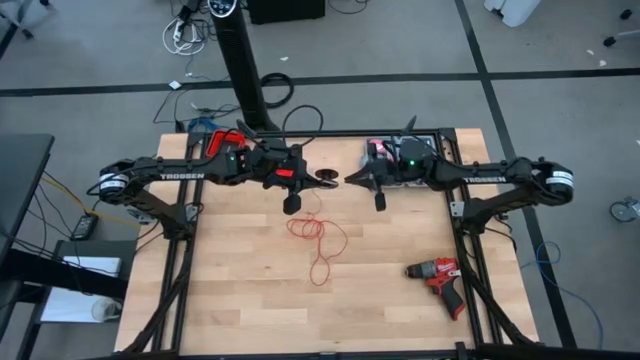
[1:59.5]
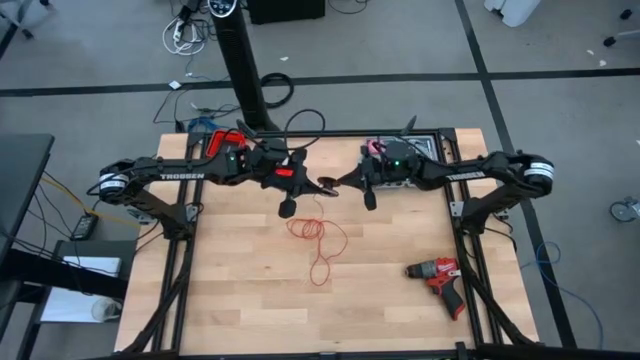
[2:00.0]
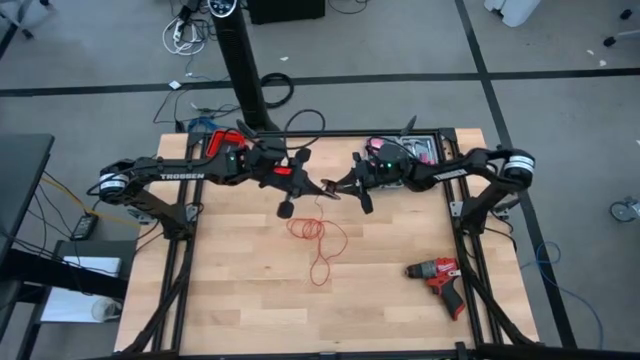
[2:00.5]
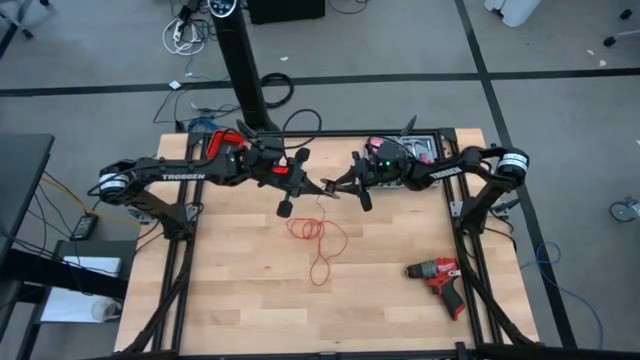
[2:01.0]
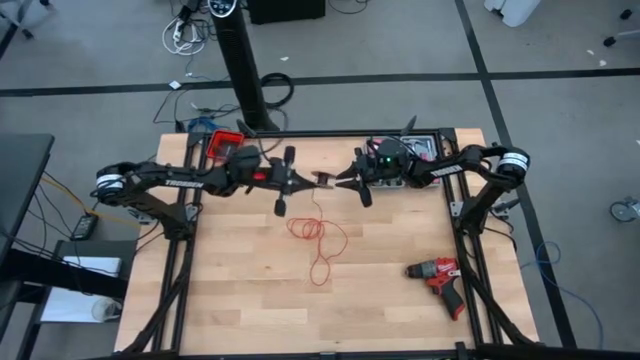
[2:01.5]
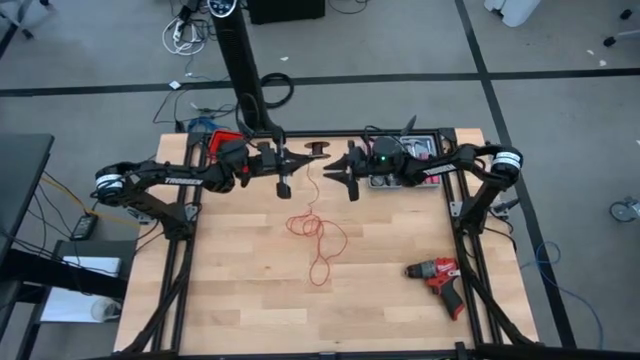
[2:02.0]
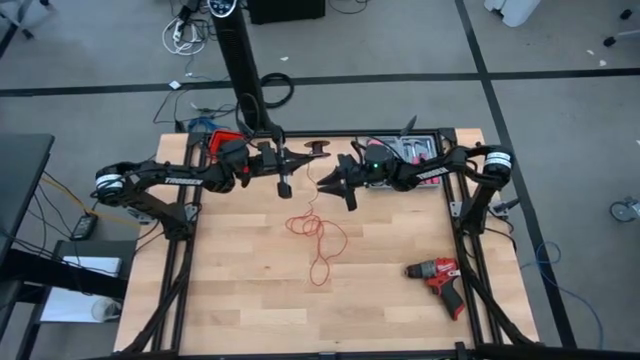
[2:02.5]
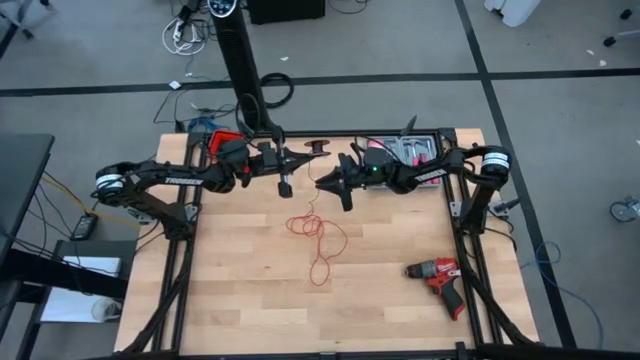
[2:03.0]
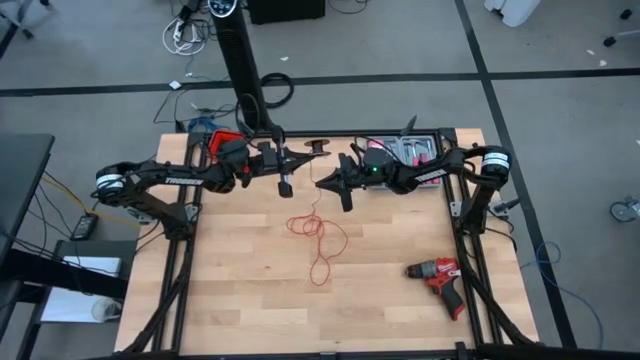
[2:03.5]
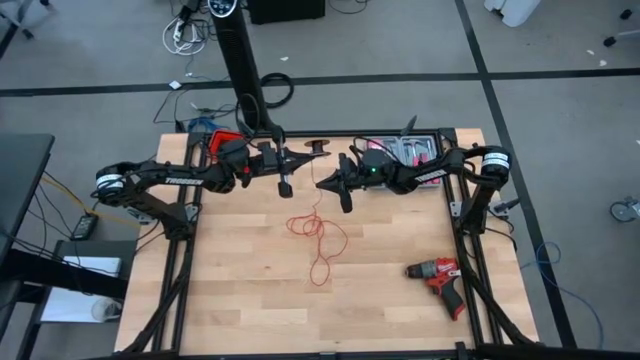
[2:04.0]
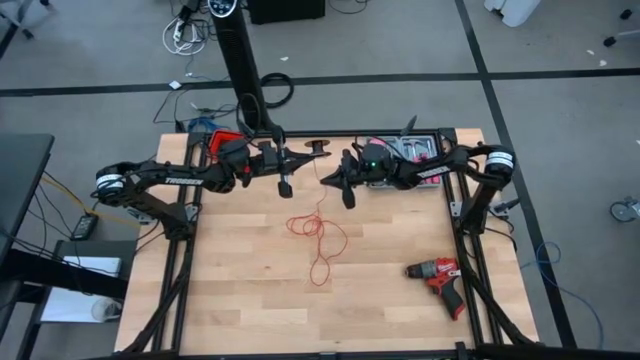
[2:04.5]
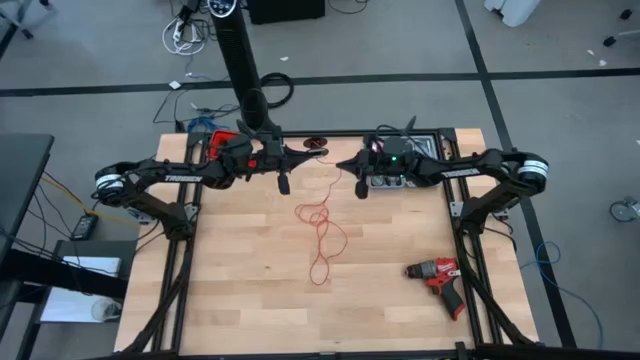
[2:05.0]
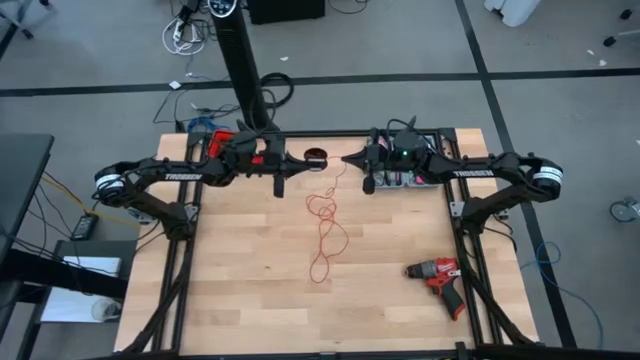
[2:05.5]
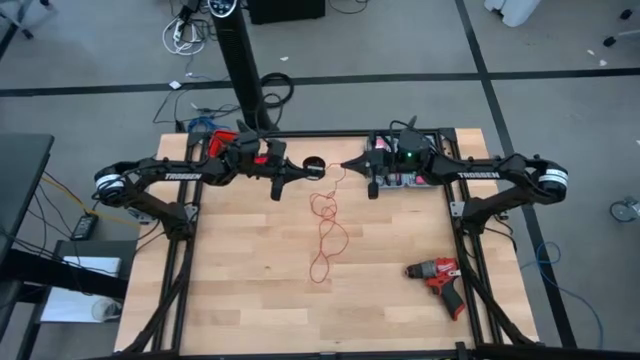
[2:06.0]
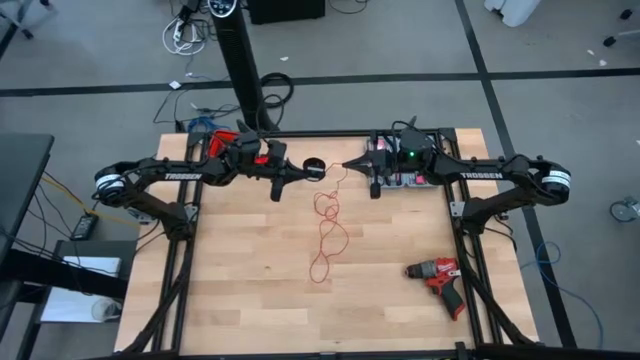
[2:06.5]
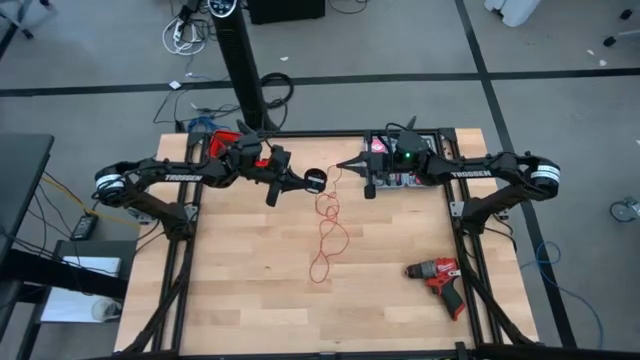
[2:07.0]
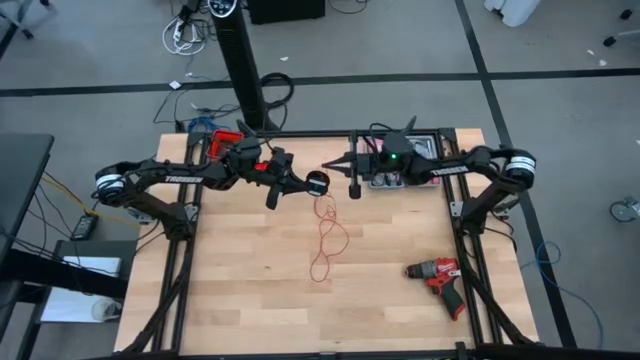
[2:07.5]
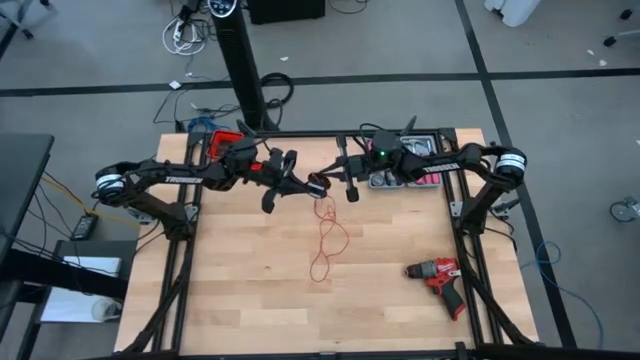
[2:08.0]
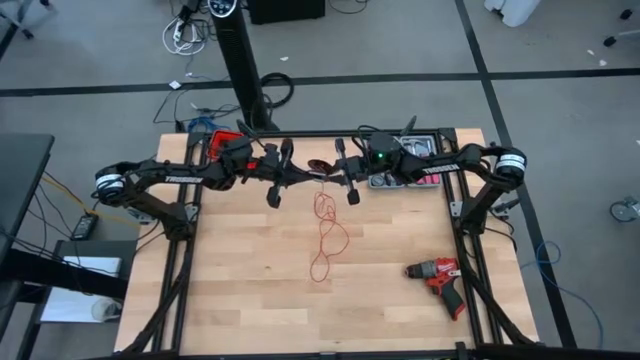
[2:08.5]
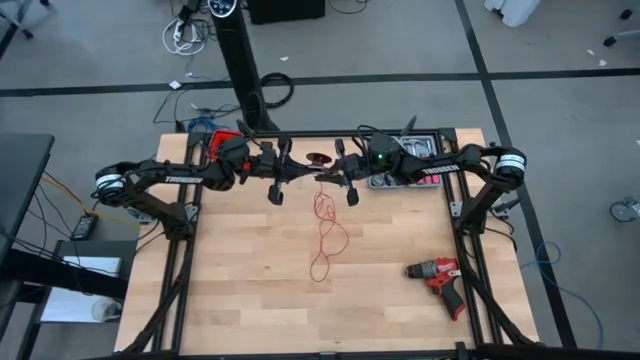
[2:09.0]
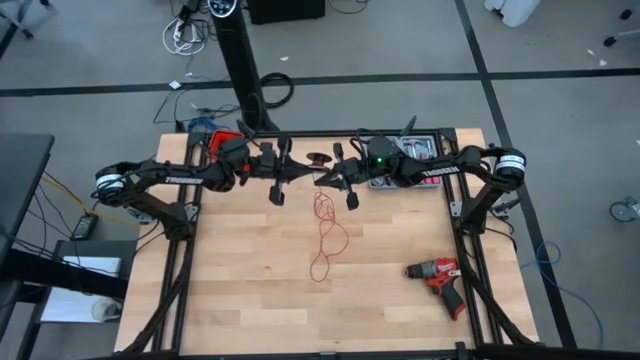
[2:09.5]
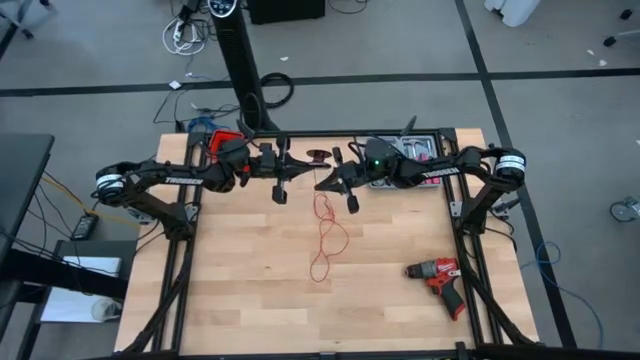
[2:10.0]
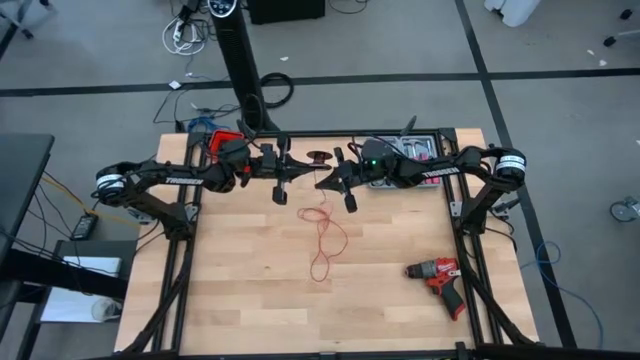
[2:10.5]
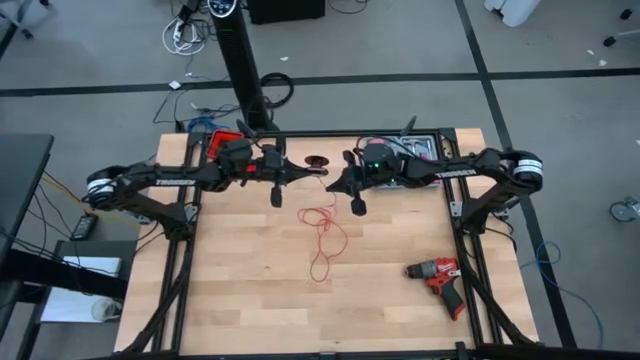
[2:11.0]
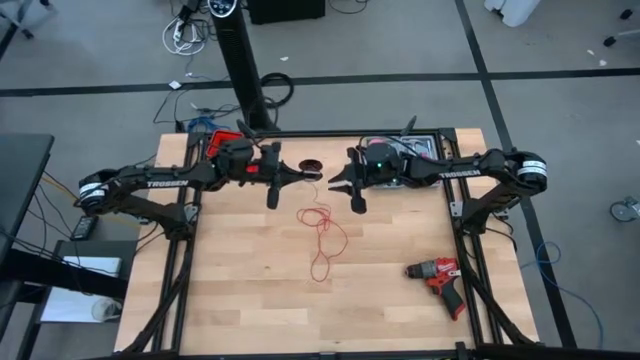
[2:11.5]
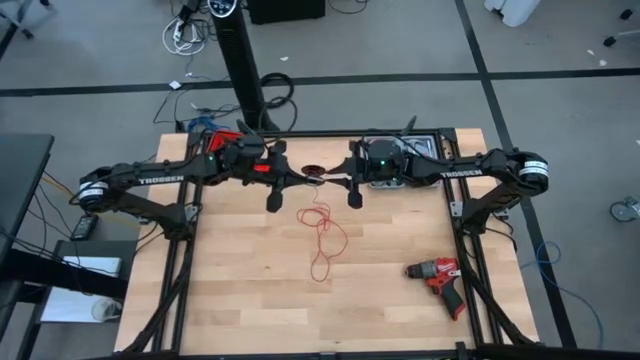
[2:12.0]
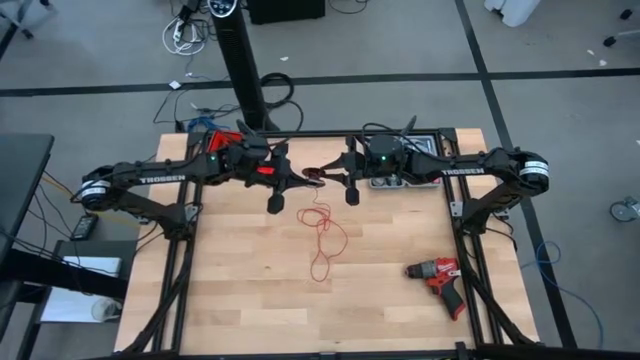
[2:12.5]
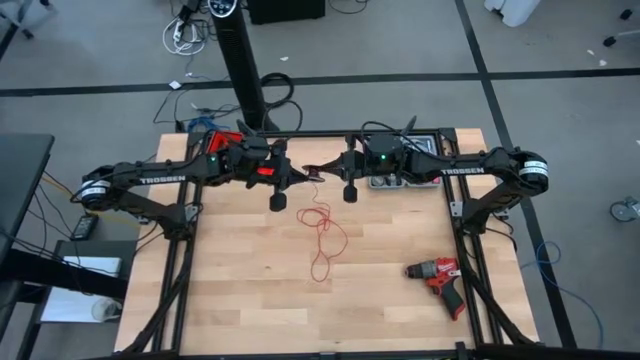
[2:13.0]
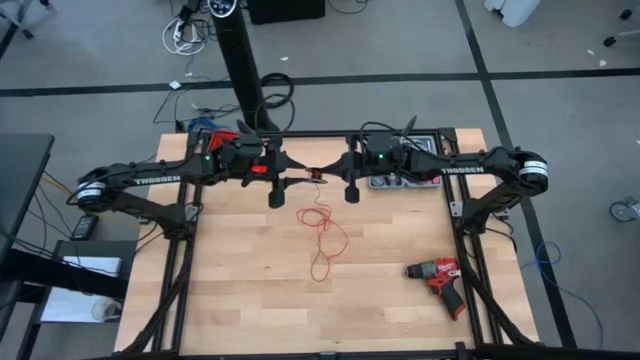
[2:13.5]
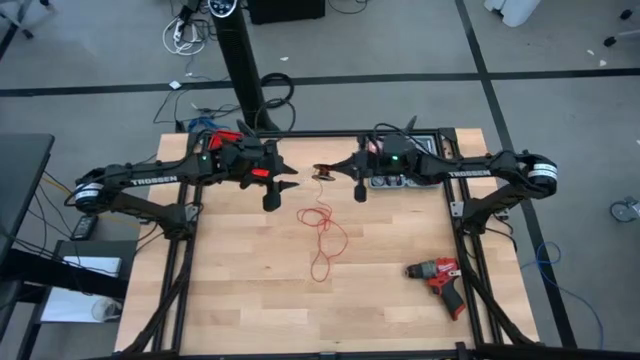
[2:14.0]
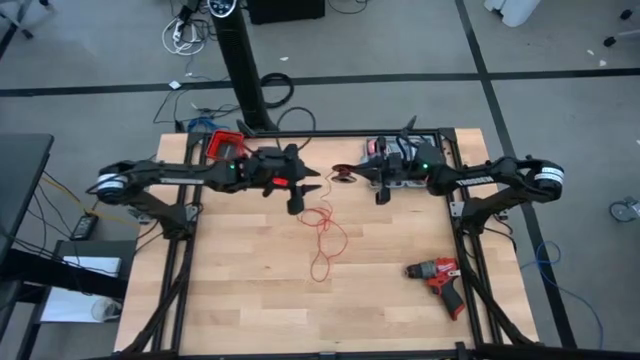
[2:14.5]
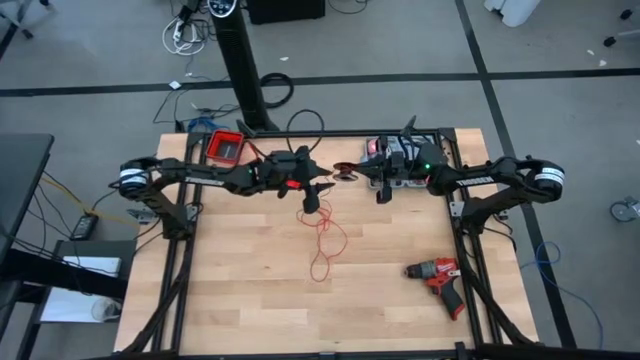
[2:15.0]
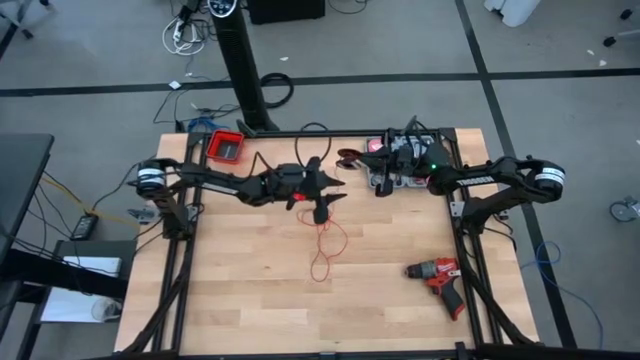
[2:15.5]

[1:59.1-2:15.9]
Task: Coil cords
Coil the red wire onto the black spool

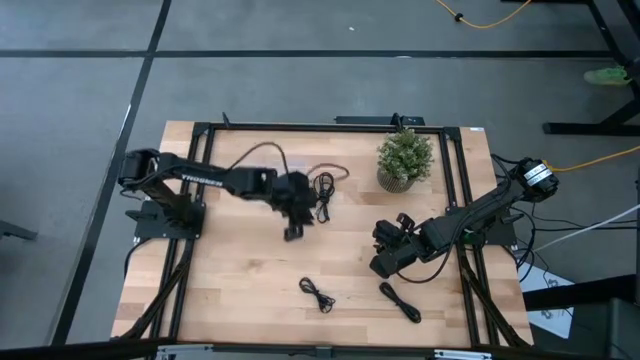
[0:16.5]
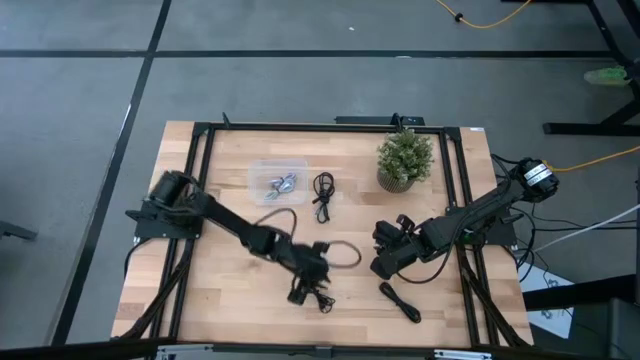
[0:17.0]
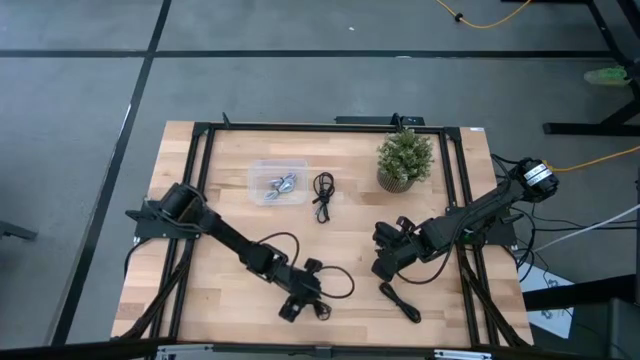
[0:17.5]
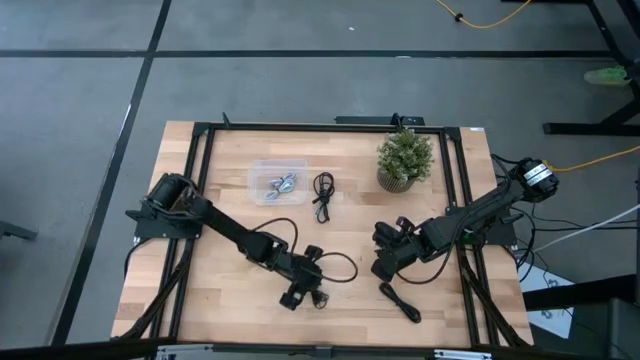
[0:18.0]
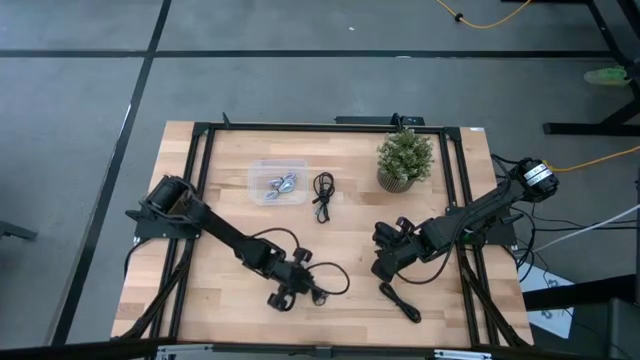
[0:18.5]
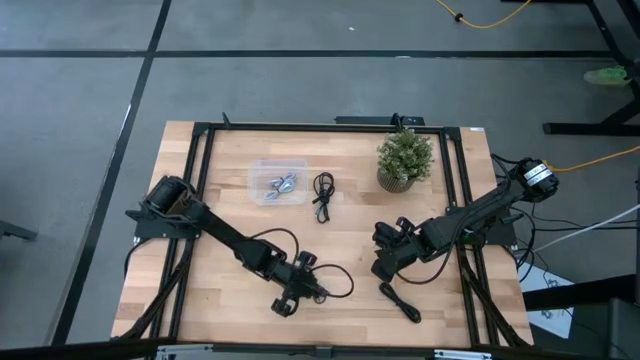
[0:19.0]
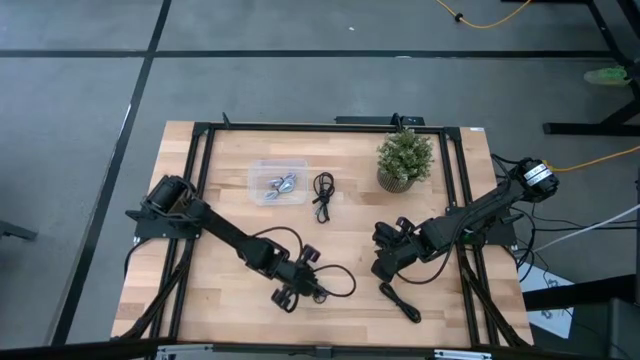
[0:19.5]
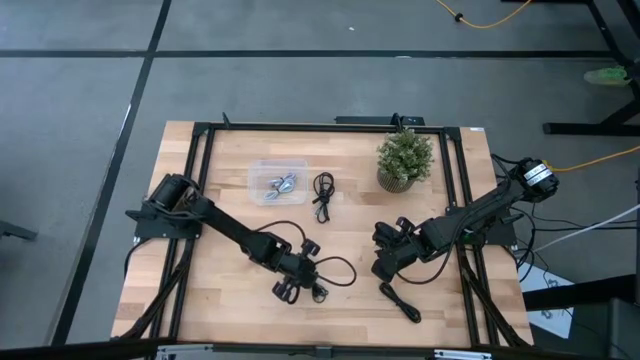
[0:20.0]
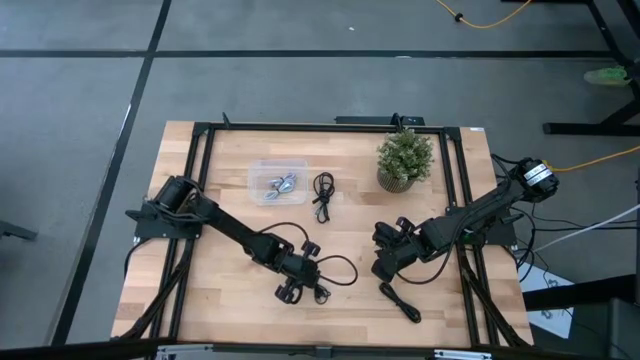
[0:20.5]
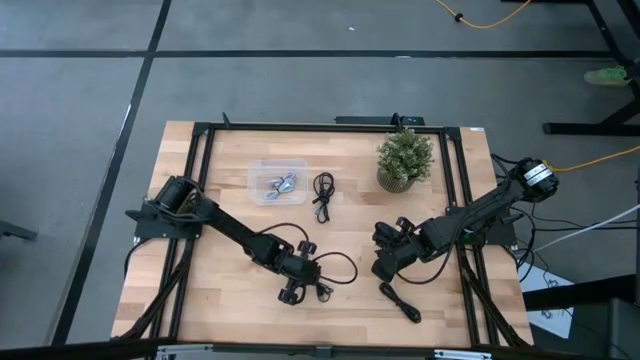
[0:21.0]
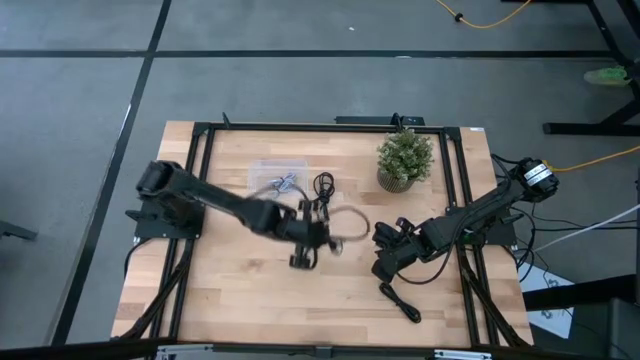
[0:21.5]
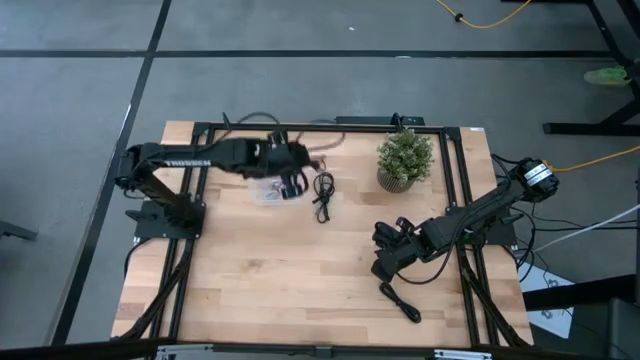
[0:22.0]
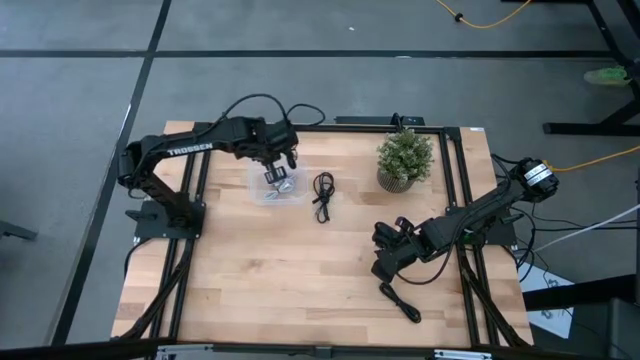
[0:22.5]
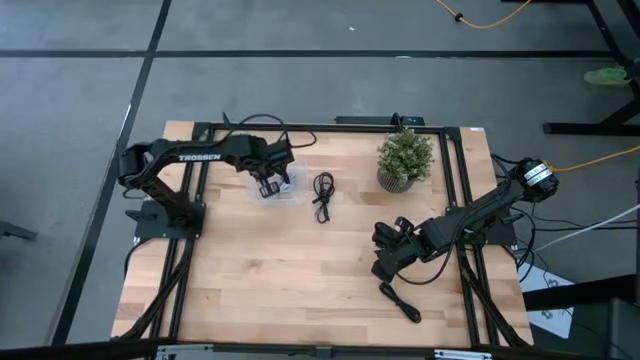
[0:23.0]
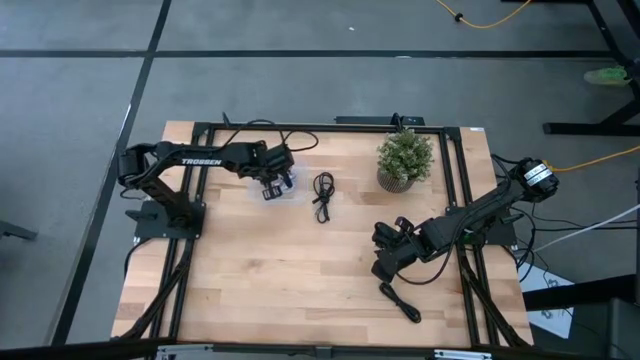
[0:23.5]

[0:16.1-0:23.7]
Task: Pick and place USB-C Cables
Put the bottom left black USB cable into the transparent bin
